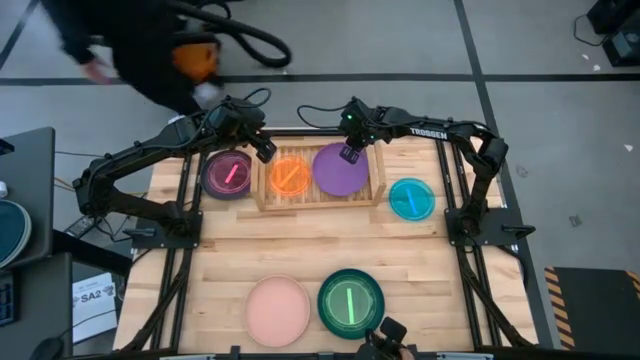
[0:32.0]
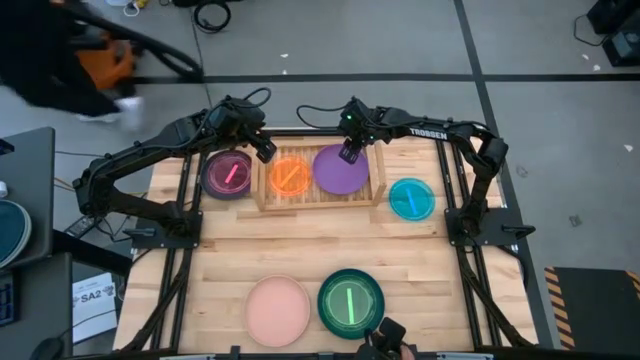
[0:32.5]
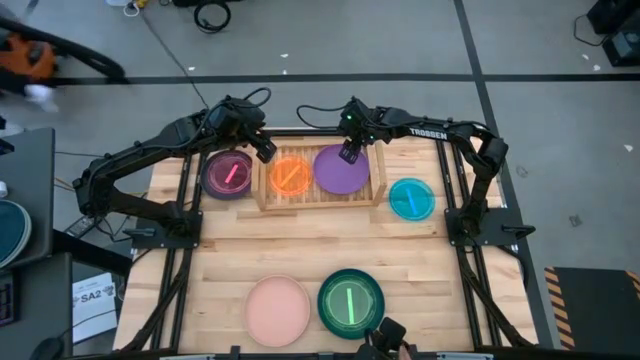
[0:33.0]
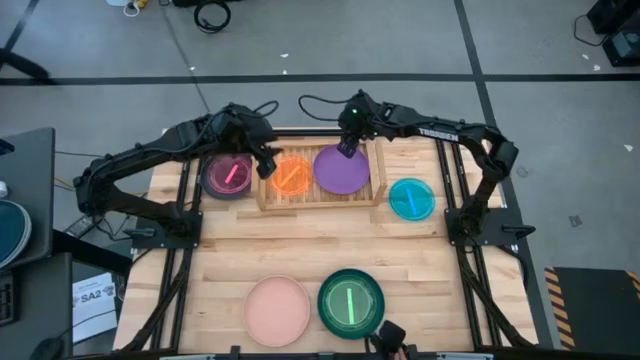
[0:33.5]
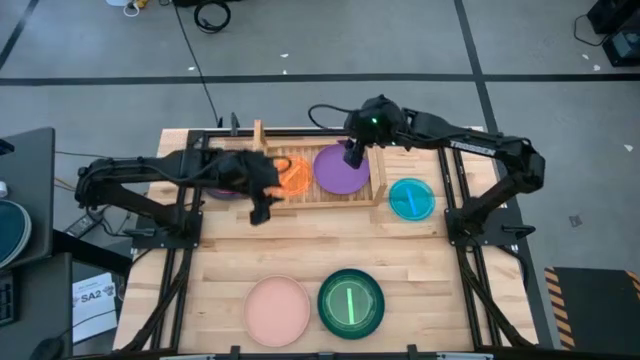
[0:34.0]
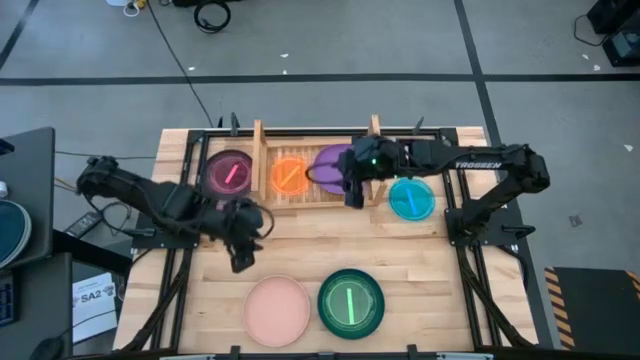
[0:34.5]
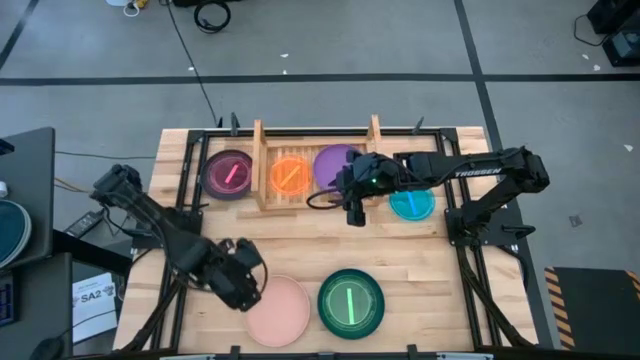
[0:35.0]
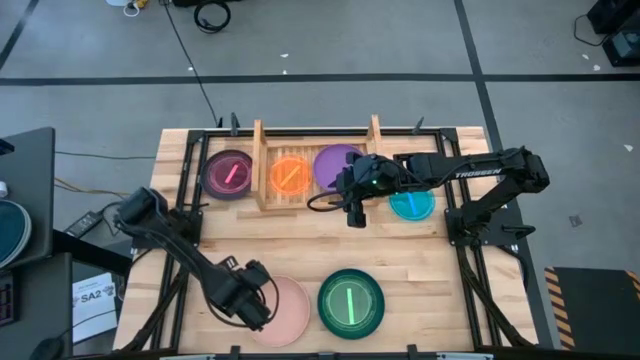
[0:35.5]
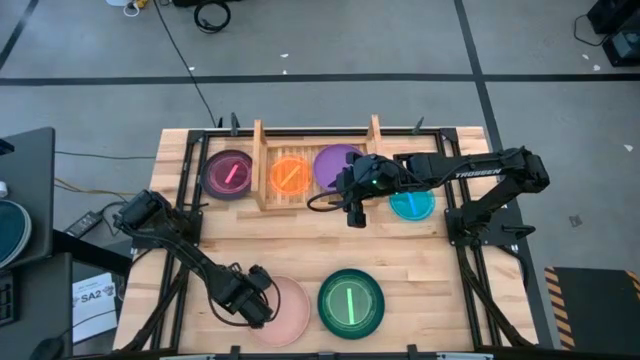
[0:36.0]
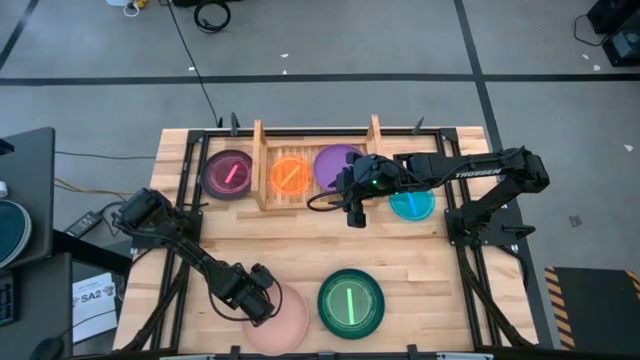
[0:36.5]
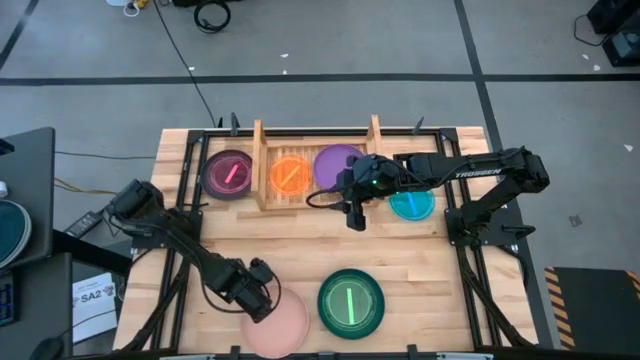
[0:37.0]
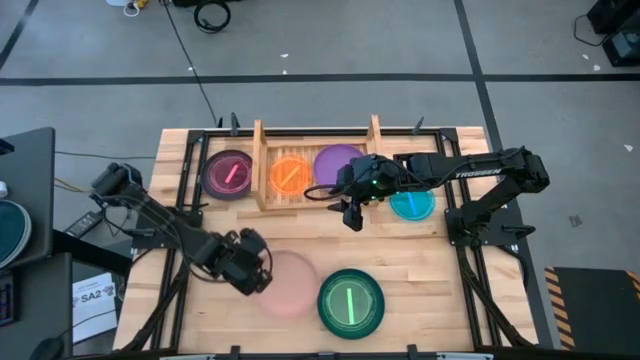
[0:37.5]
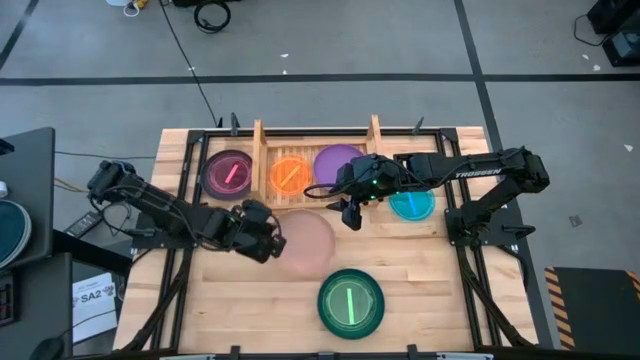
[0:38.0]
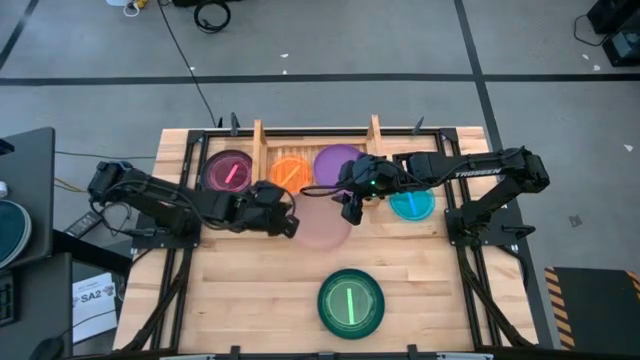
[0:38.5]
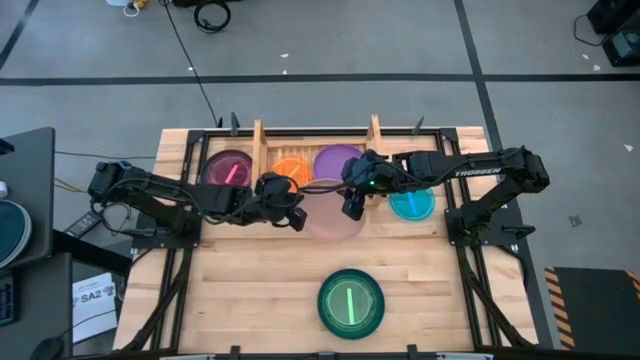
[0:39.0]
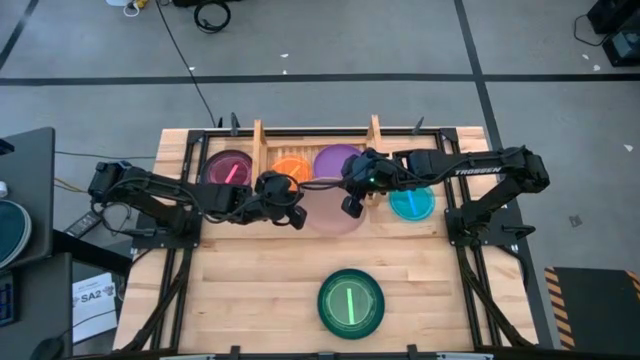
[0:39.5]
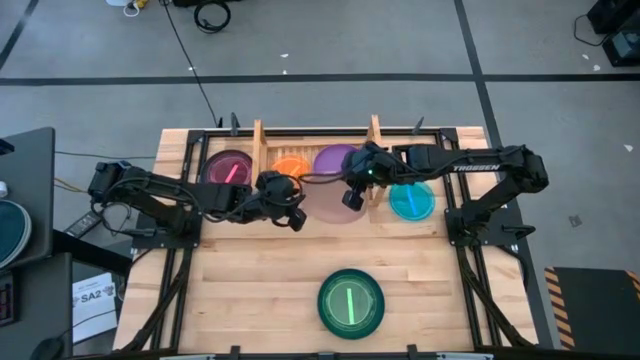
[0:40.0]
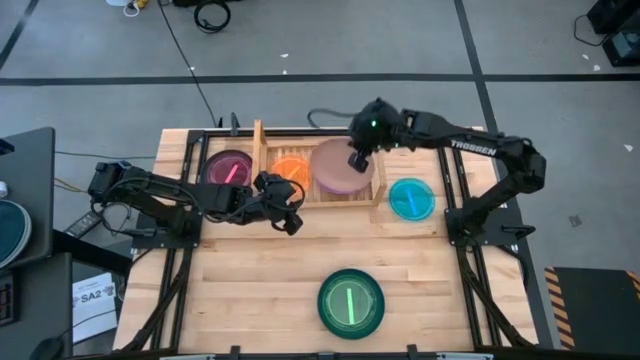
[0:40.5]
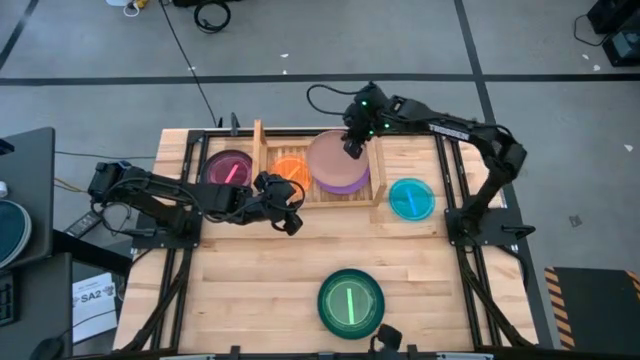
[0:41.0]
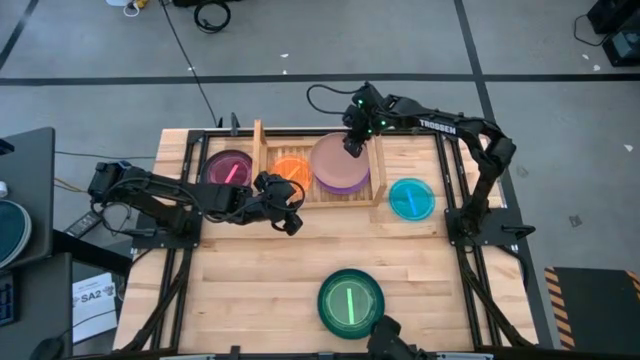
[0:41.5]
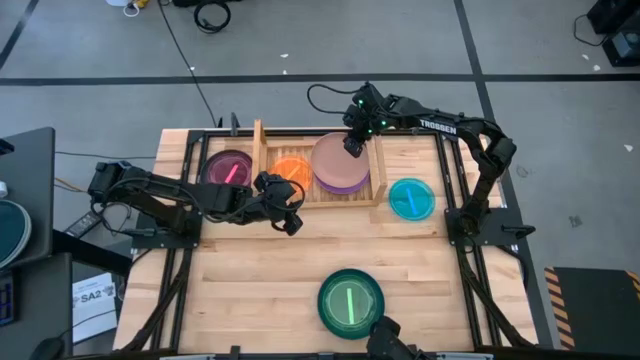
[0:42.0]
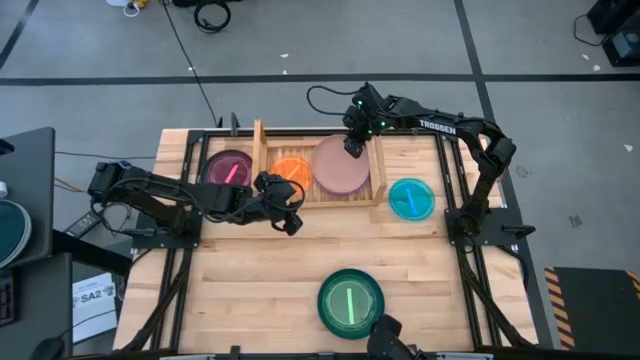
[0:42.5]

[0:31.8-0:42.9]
Task: Place and stack plates onto a shelf
Stack the large pink plate on top of the purple plate on the shelf

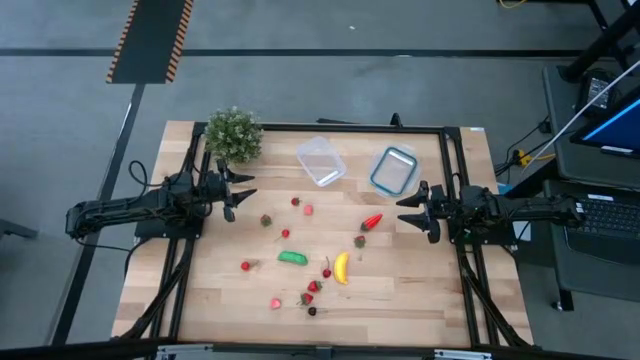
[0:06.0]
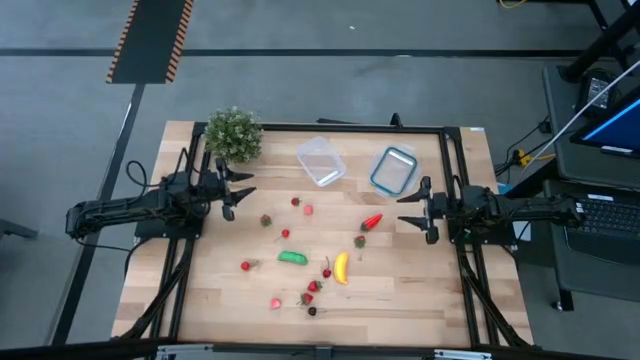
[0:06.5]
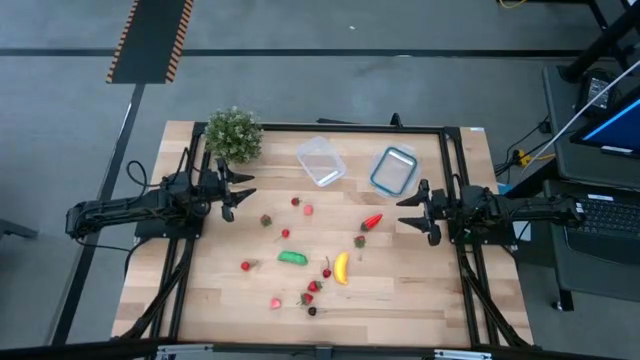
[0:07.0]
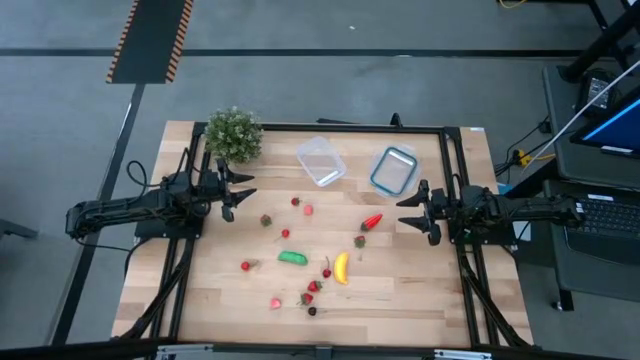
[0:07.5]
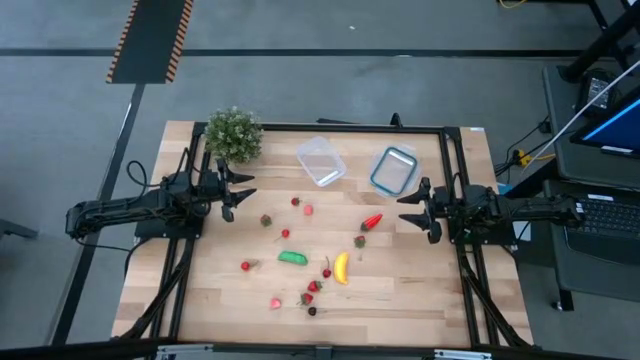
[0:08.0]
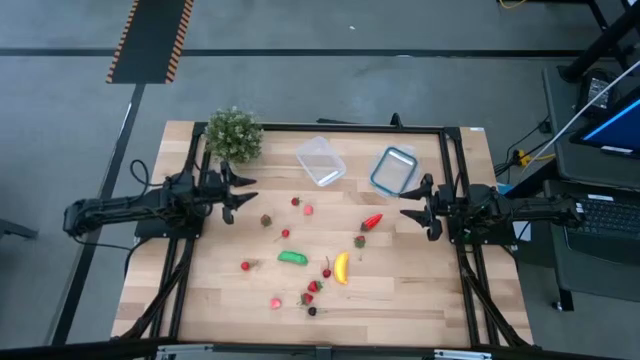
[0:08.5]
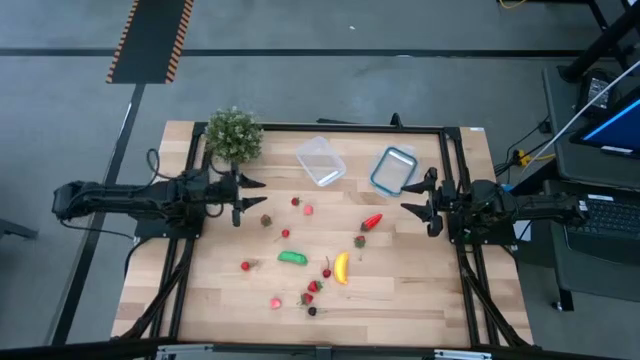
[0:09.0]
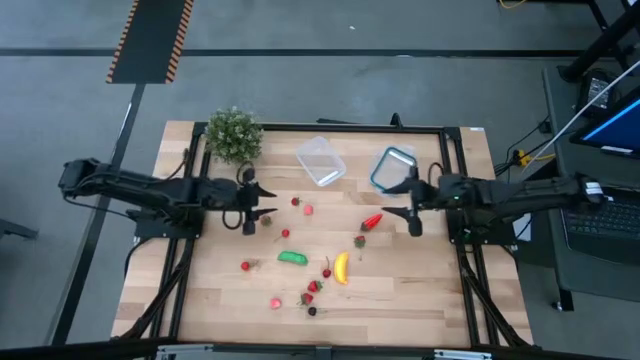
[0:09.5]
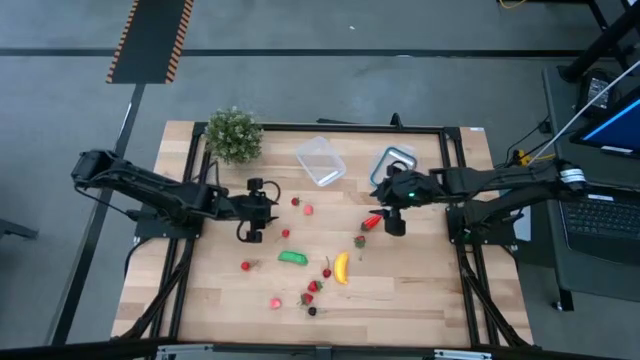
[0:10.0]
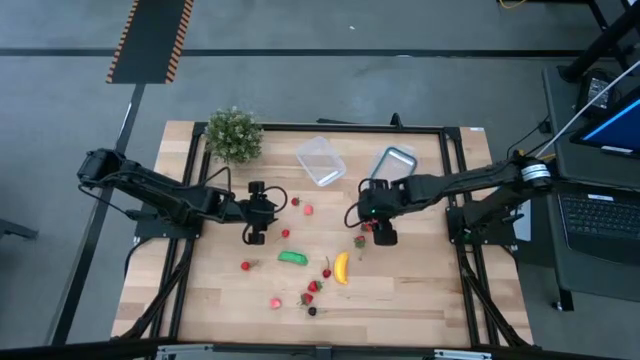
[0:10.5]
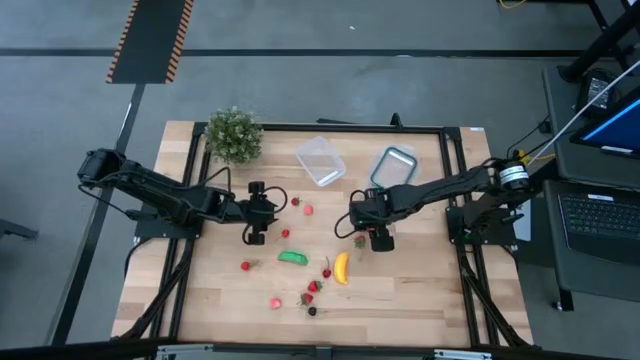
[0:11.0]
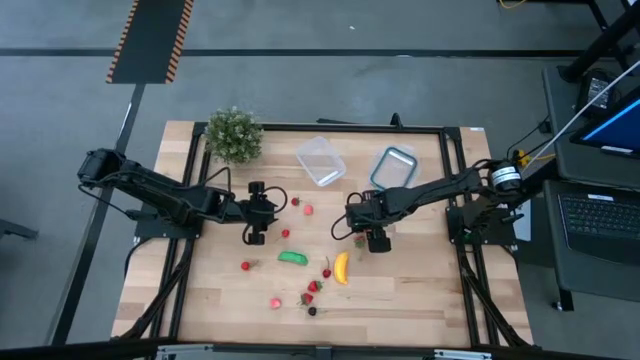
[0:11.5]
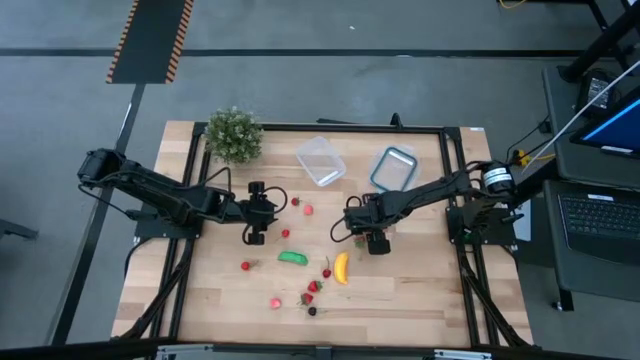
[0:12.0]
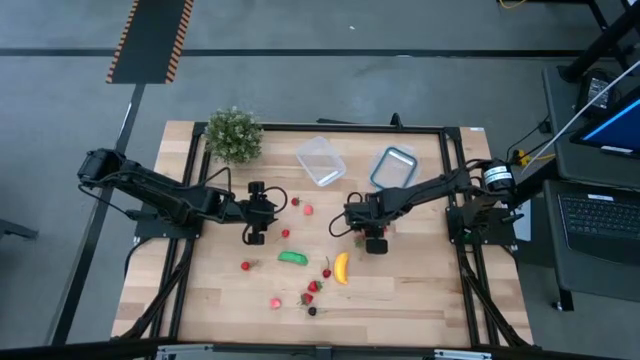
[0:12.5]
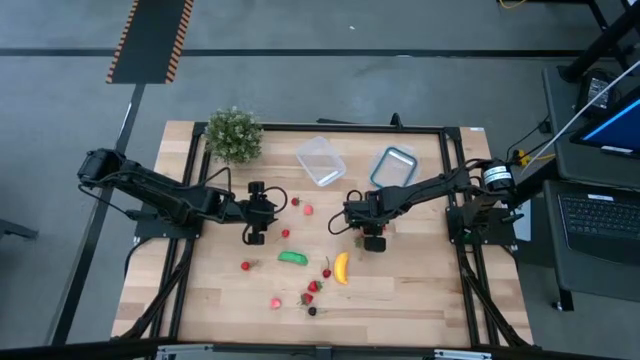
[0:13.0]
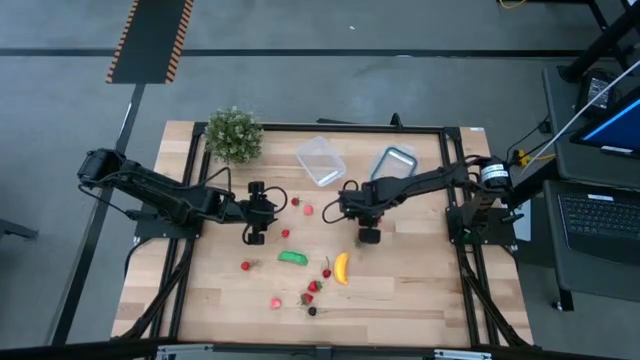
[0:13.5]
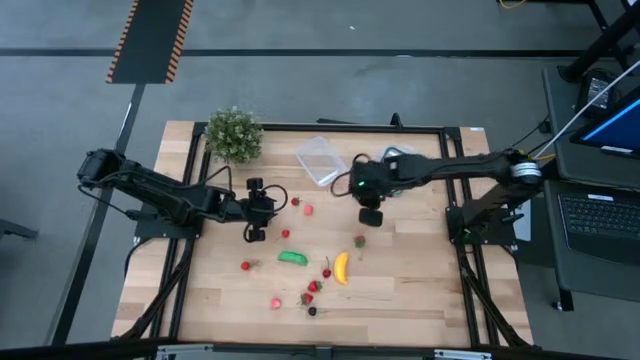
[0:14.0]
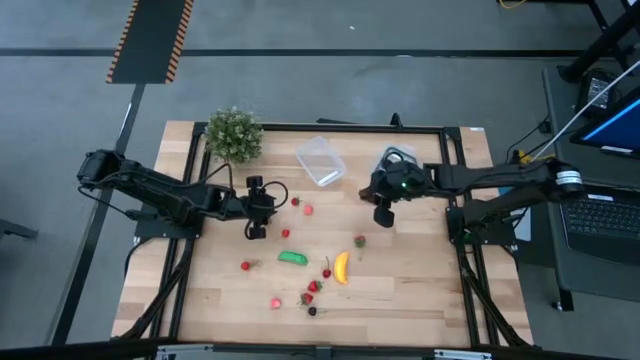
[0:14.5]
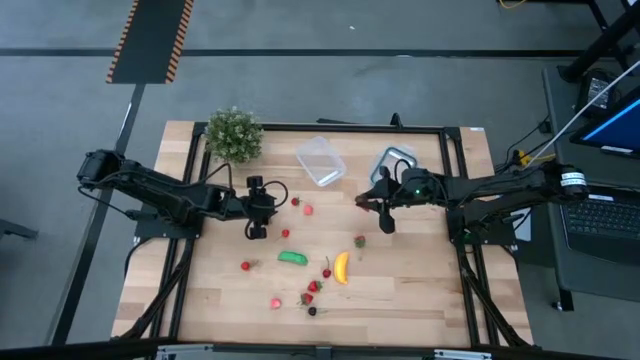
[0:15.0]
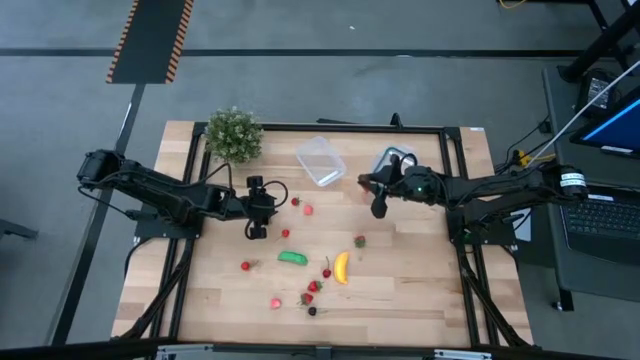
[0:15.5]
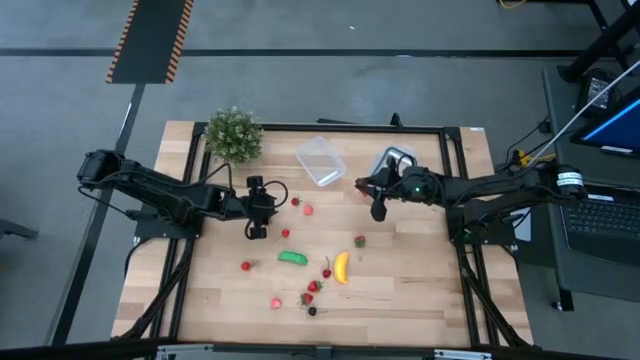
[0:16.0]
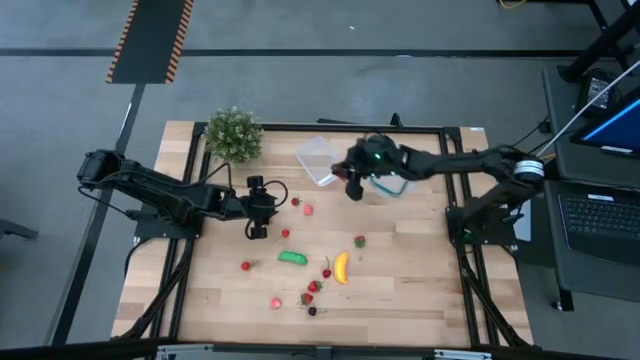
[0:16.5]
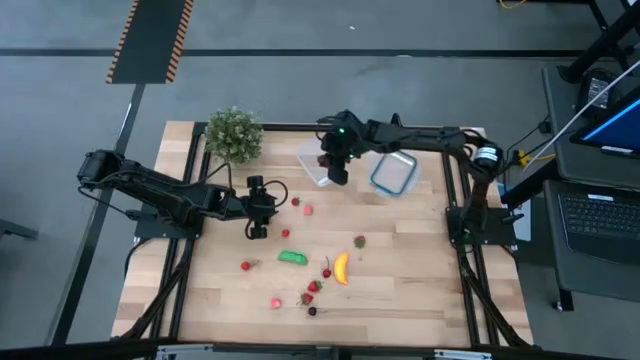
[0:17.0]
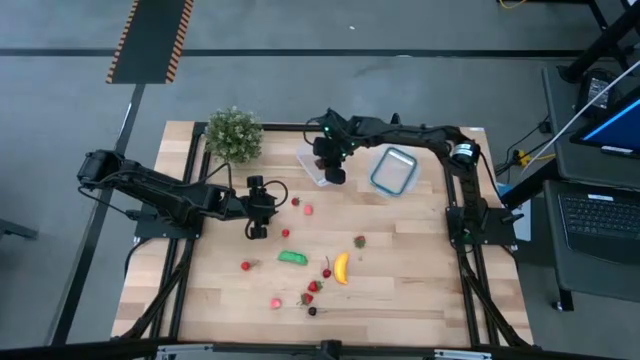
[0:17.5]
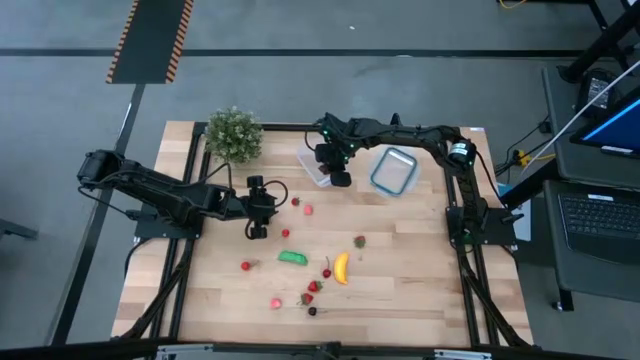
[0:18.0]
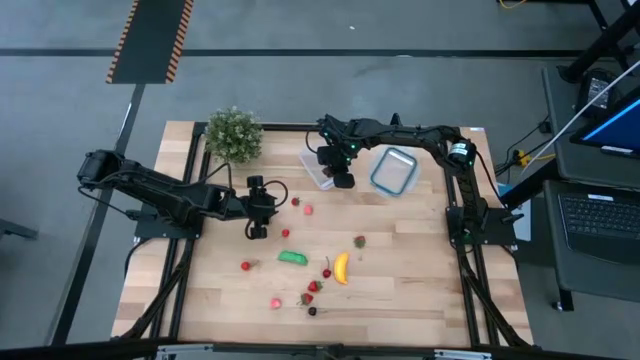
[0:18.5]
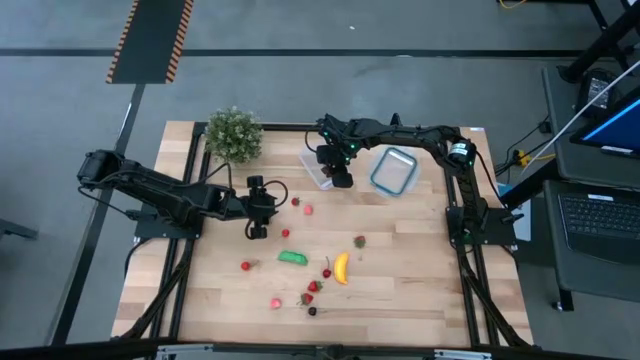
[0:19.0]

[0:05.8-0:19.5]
Task: Pick and placing Produce into tupperware
Put the red chili pepper into the transparent container
